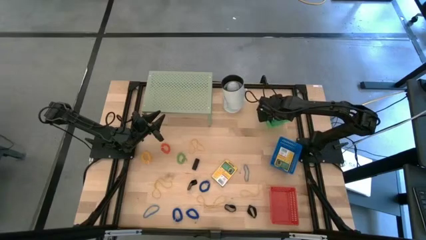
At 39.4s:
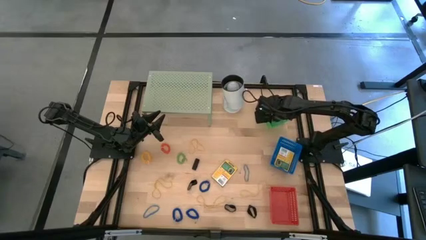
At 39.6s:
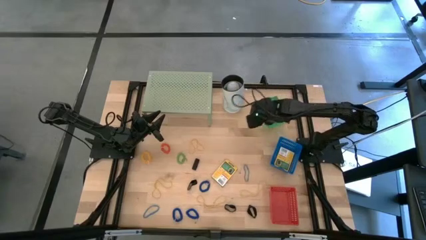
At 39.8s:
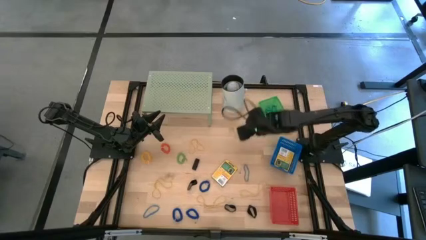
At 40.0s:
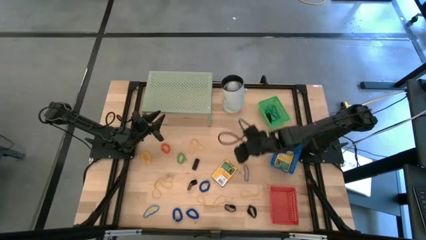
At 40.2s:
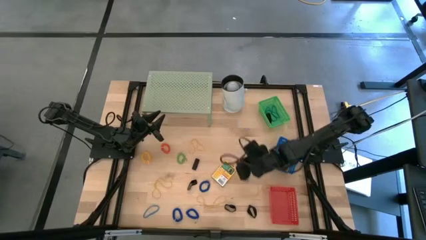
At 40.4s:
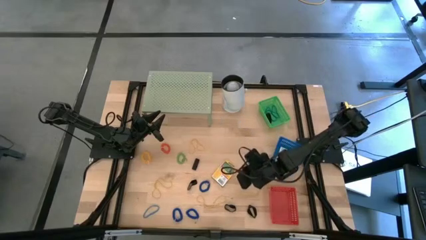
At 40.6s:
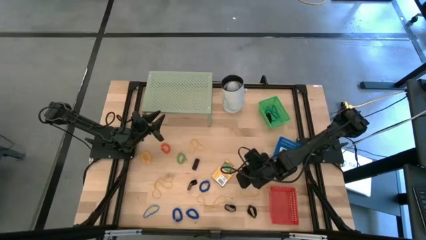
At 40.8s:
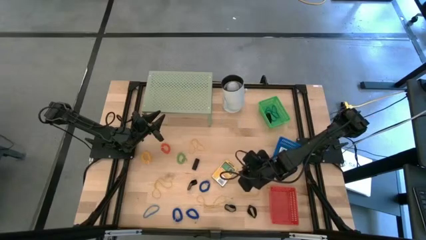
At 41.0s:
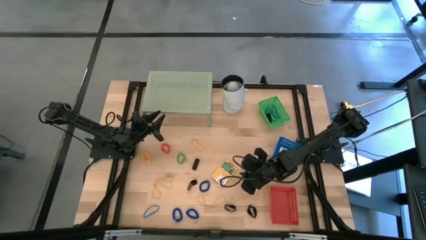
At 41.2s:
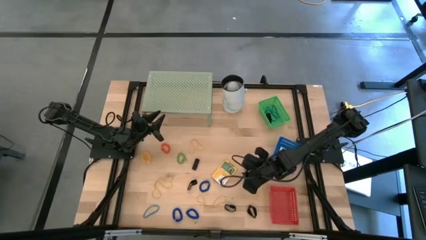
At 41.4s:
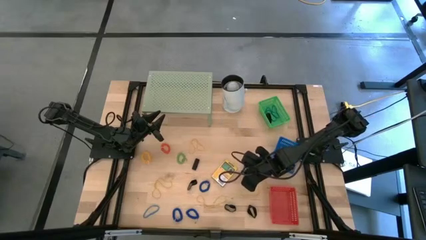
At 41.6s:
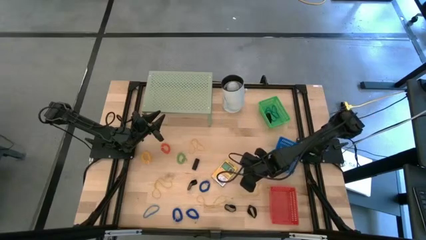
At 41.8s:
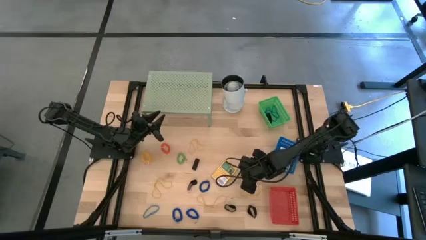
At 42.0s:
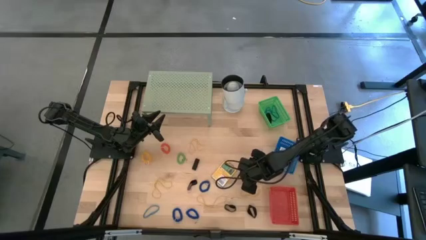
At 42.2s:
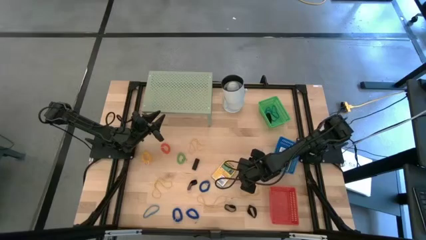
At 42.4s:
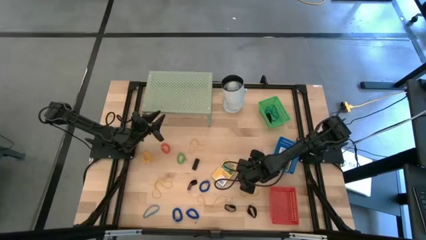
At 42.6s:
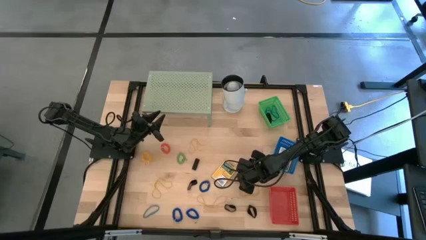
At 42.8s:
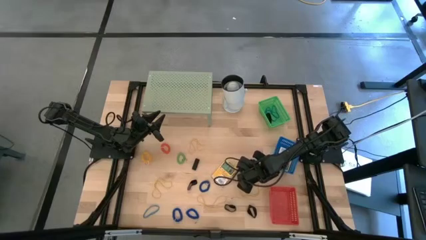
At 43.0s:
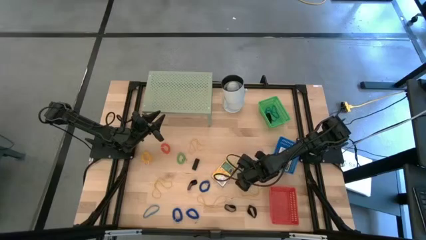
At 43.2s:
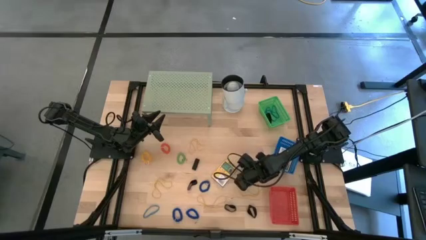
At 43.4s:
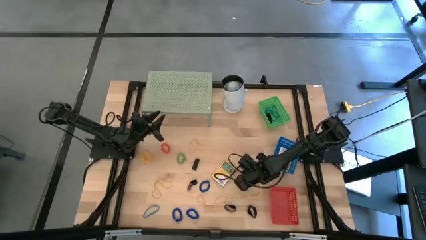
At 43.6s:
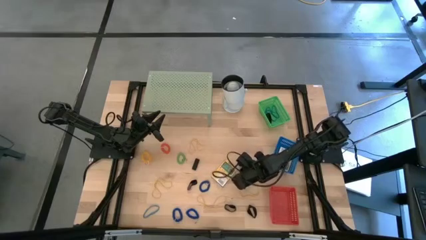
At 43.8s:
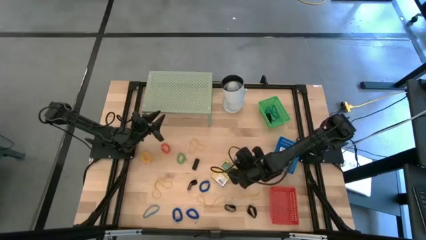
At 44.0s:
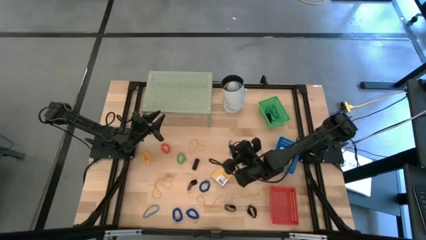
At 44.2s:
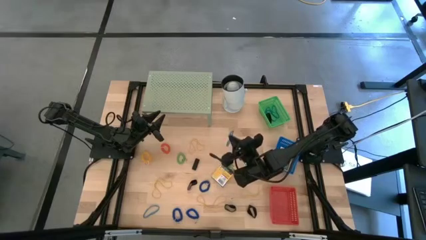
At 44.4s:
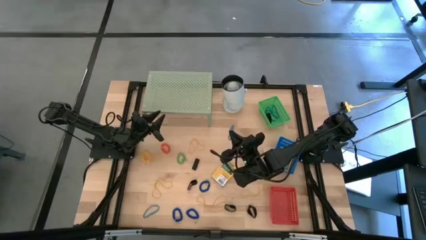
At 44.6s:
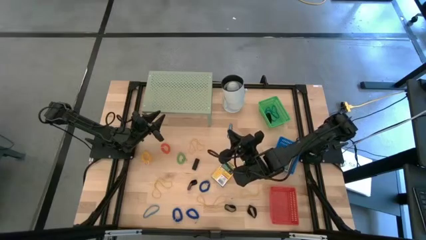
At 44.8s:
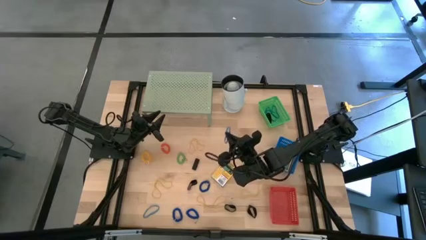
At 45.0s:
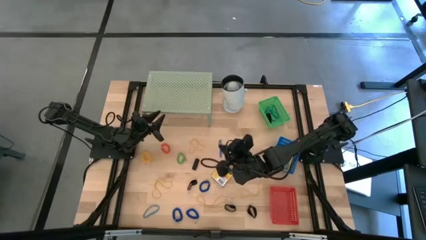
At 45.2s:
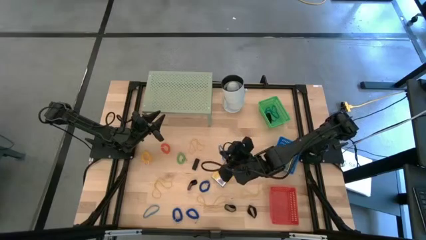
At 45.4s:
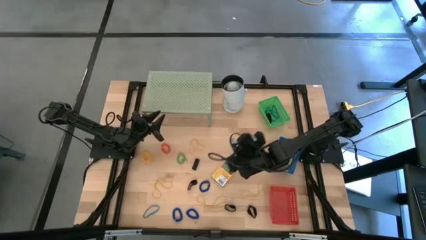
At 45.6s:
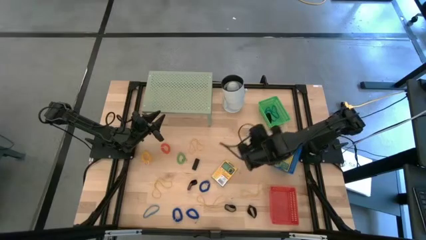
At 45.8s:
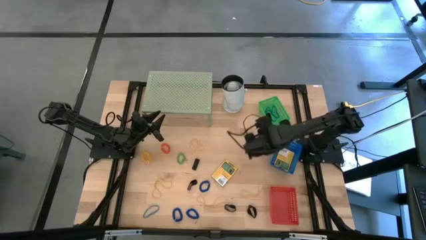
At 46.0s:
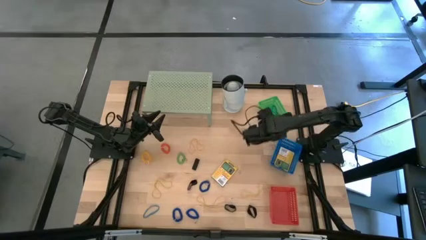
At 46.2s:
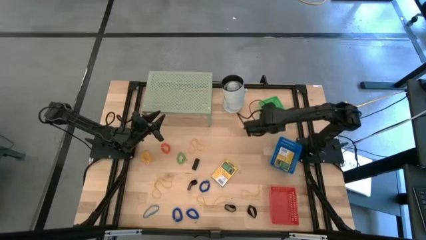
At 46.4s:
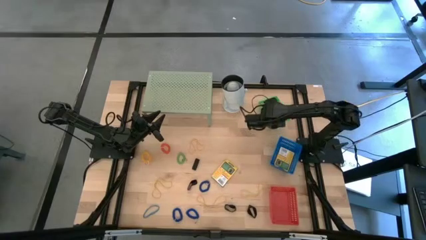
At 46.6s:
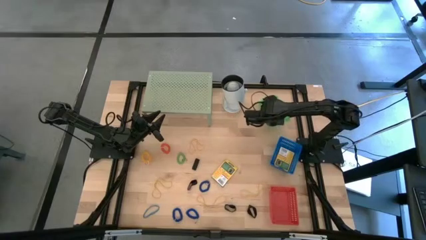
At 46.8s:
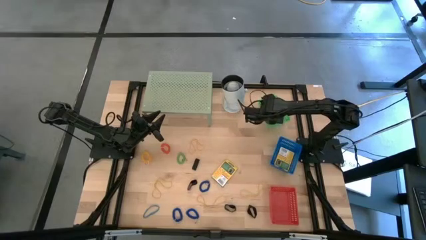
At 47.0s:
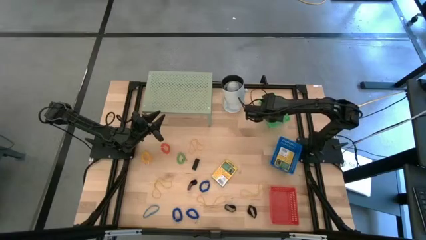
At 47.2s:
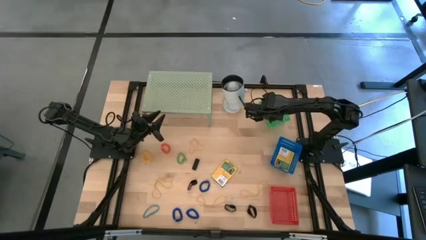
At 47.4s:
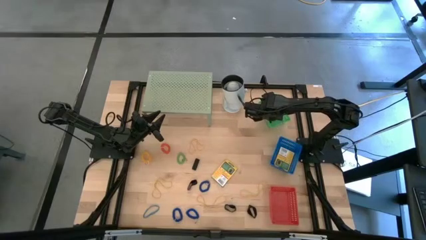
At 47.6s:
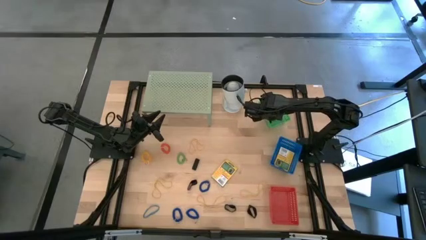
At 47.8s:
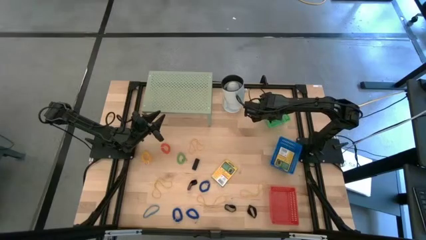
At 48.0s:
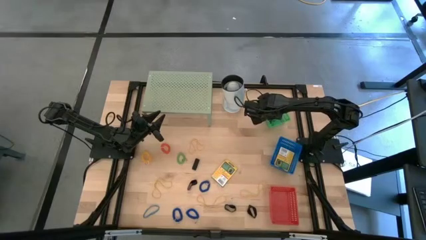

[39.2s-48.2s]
Task: Pick & Place Office Desk Supplies
Put the blue rubber band into the green bin

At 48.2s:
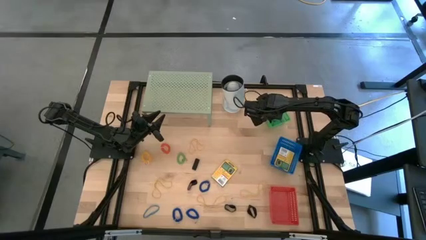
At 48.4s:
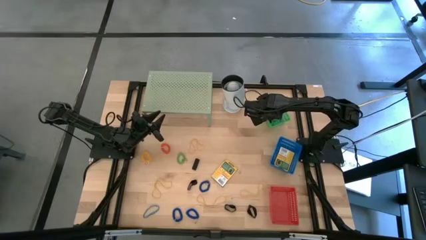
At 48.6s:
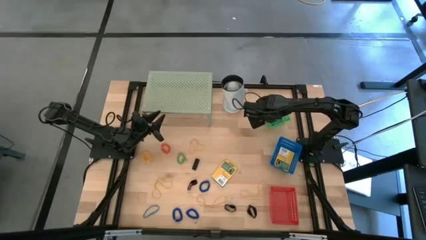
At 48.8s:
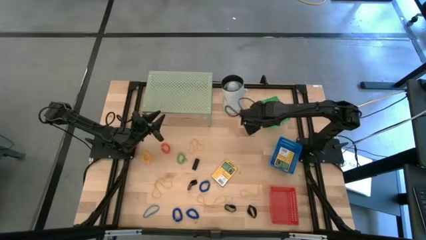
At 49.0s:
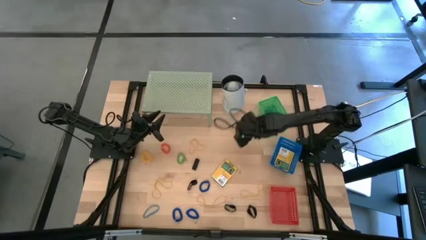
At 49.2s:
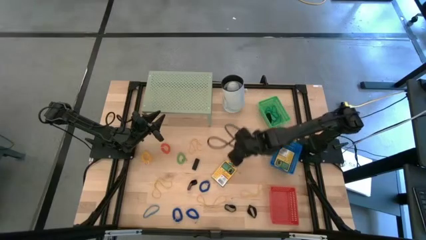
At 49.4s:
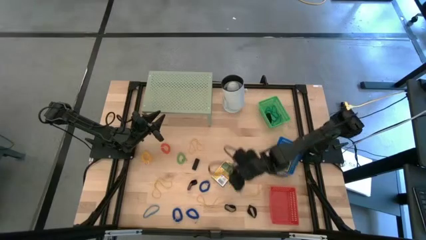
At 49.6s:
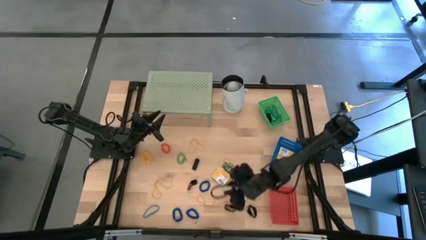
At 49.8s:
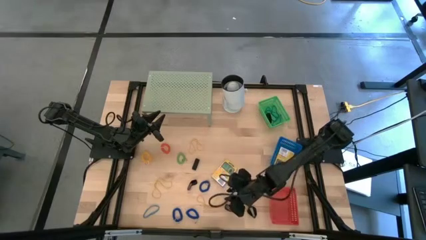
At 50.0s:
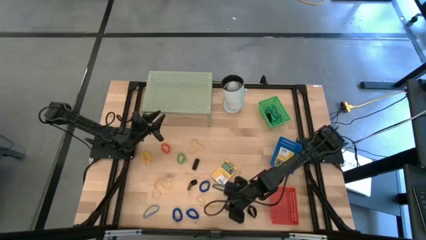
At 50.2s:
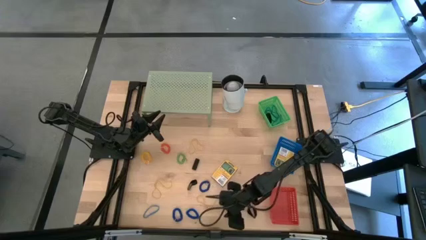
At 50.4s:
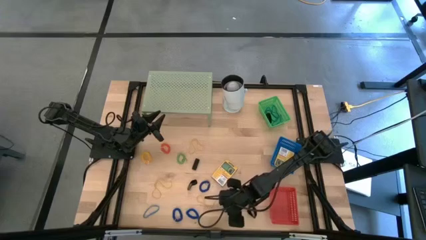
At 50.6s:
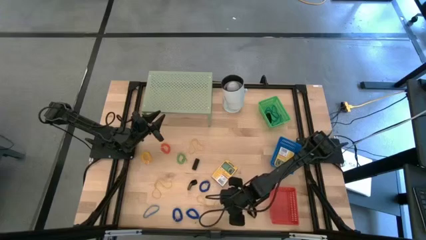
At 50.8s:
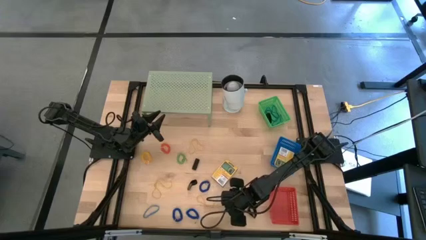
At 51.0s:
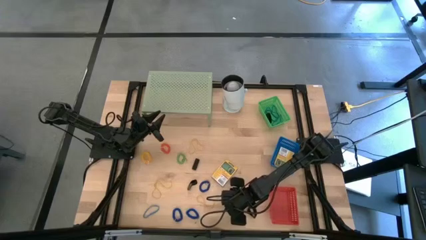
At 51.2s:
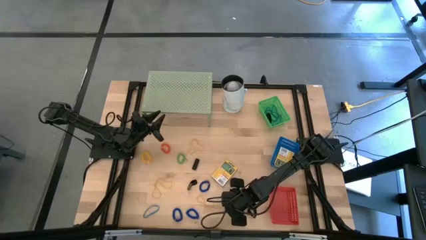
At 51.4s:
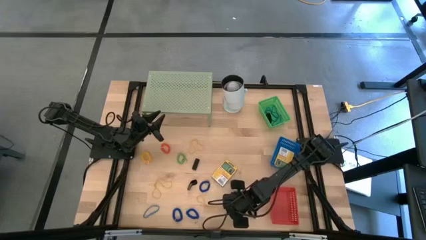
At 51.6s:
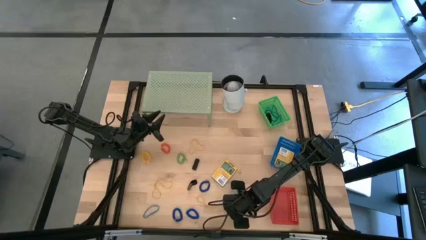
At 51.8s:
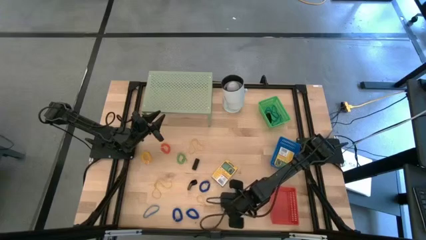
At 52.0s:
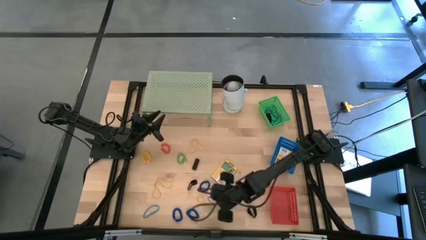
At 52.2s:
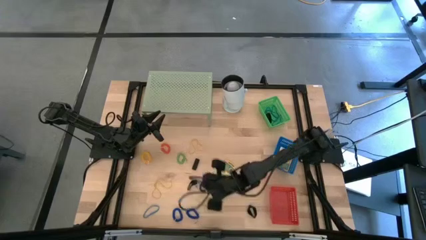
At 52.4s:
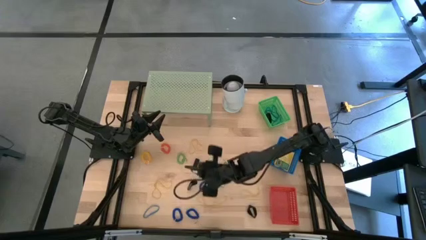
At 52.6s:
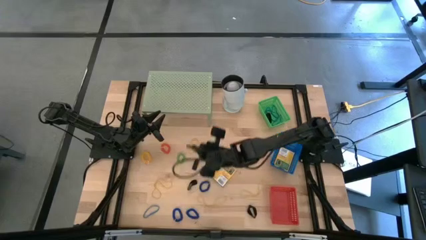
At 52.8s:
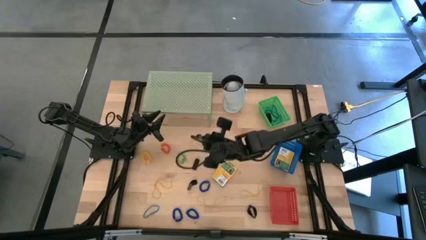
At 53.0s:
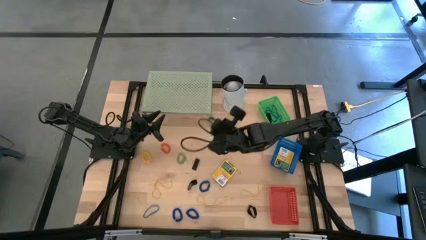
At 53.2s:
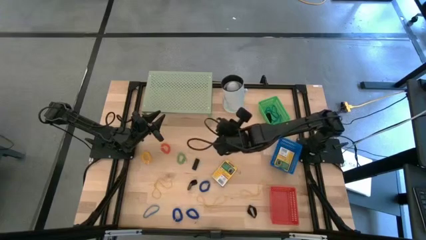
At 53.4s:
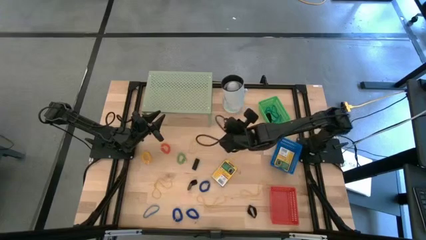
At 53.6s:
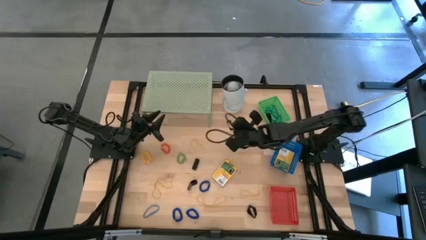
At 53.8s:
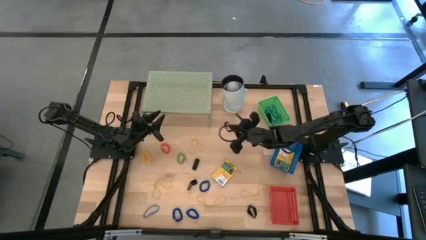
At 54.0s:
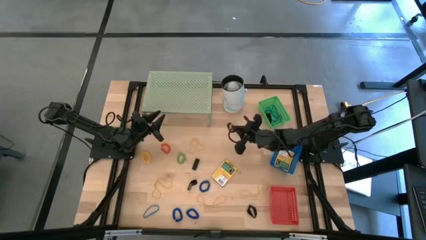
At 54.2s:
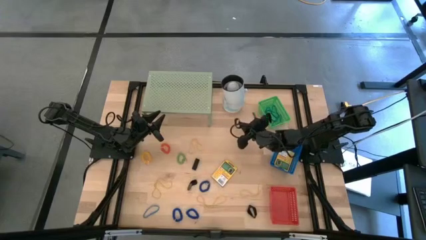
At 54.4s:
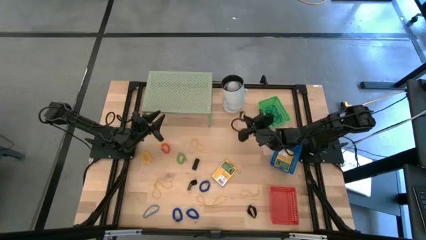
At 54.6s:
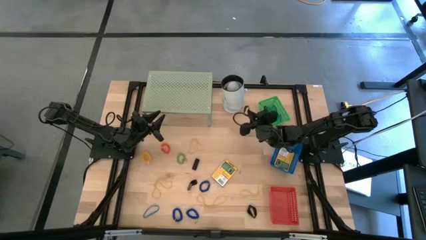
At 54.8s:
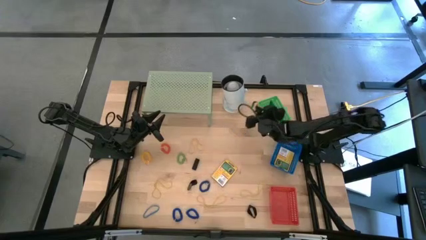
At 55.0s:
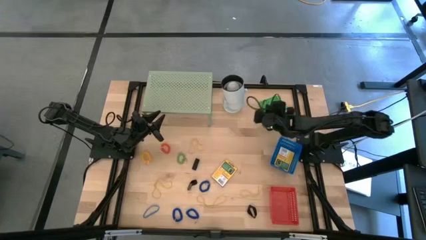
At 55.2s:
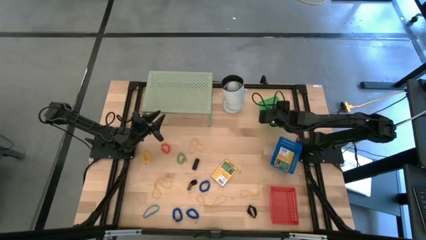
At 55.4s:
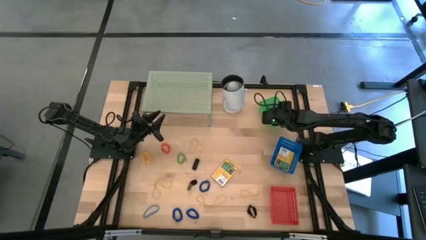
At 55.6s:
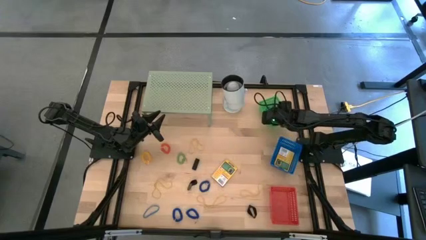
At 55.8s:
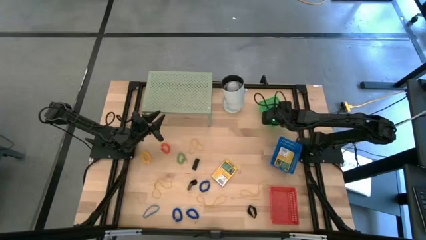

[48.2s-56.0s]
Put the black rubber band into the green bin
